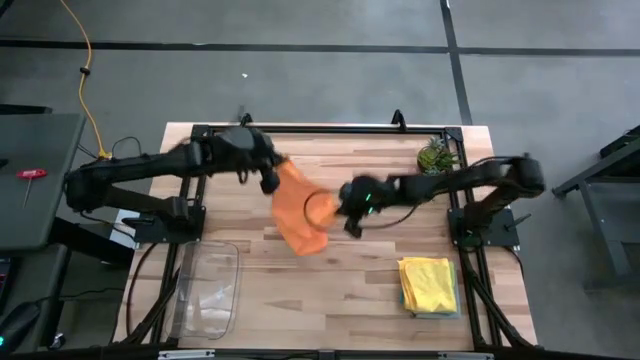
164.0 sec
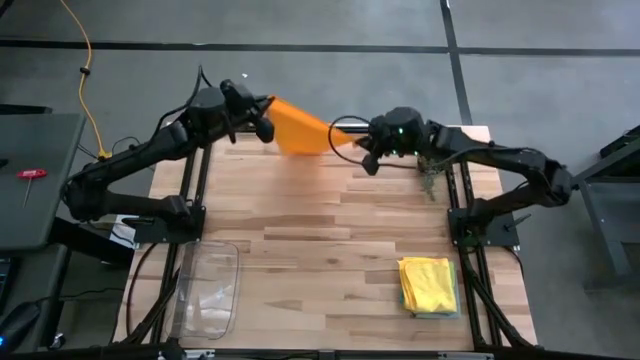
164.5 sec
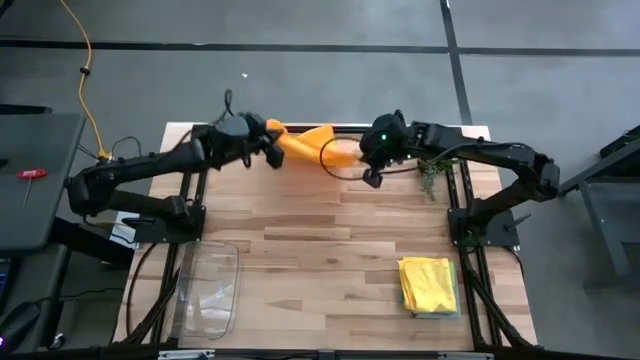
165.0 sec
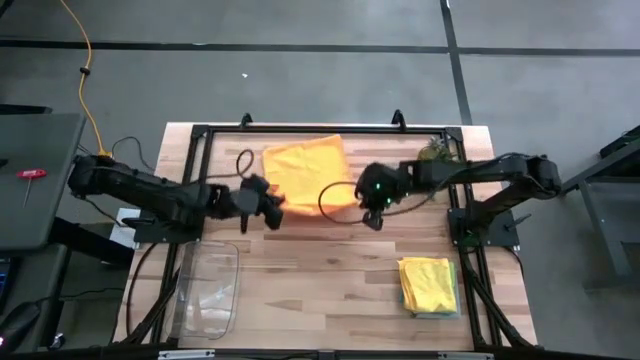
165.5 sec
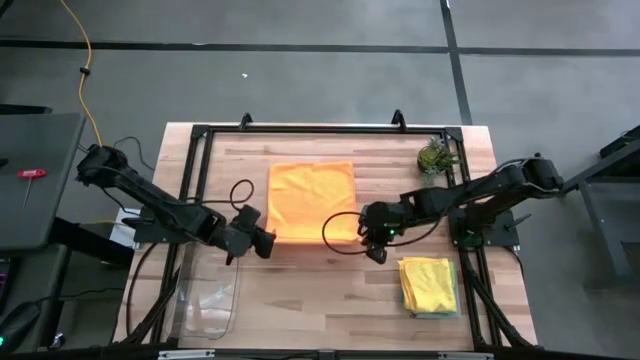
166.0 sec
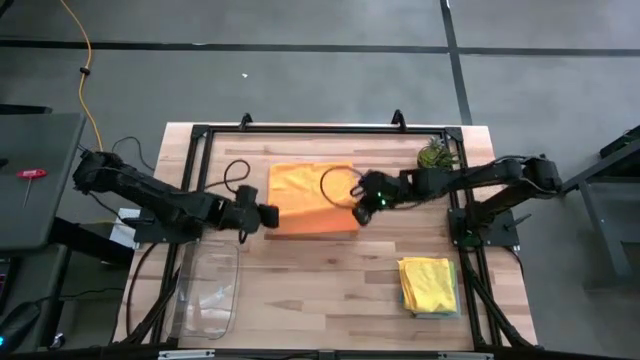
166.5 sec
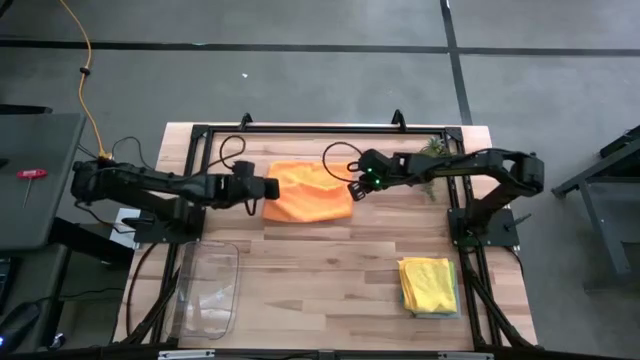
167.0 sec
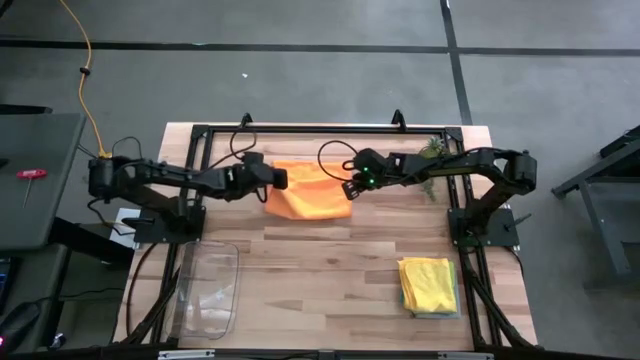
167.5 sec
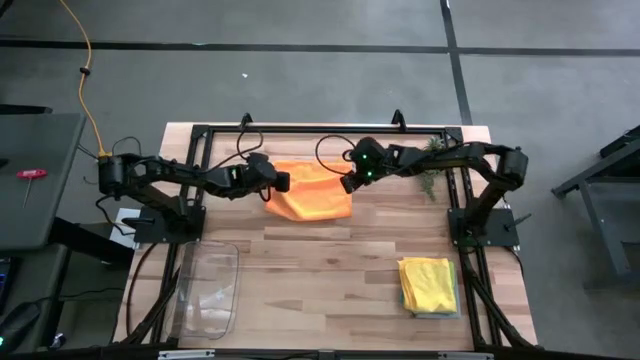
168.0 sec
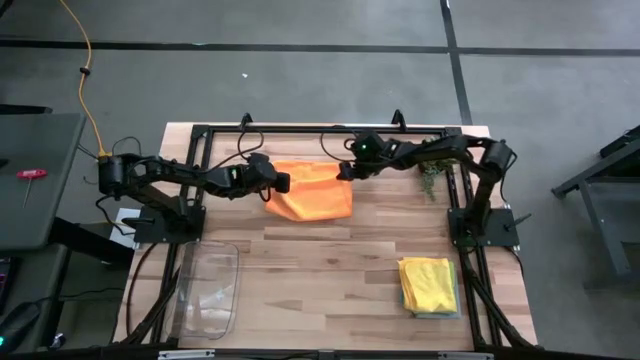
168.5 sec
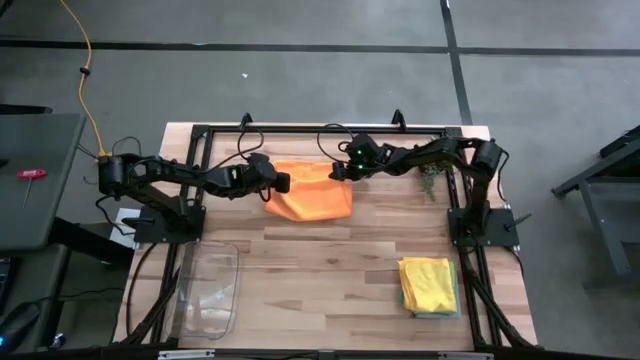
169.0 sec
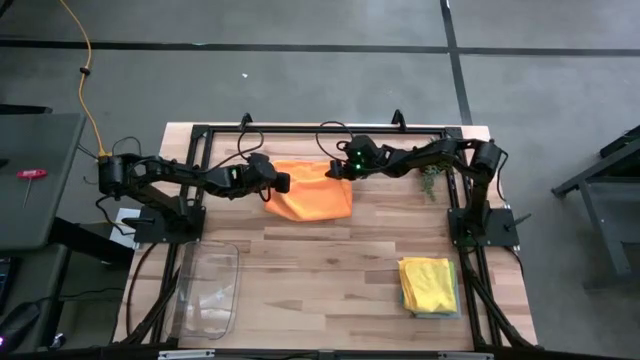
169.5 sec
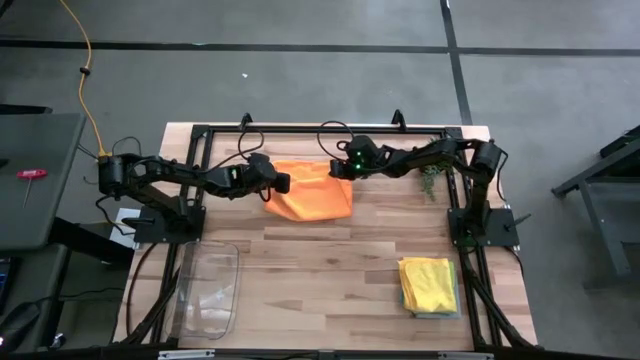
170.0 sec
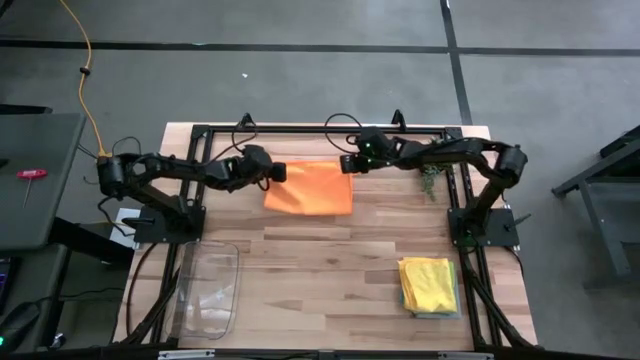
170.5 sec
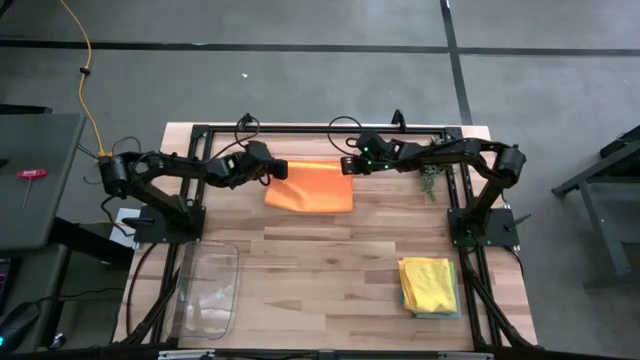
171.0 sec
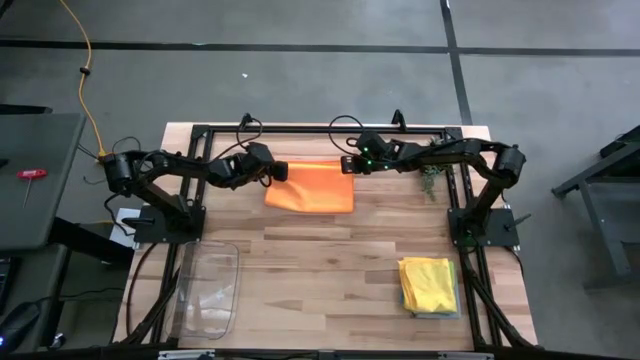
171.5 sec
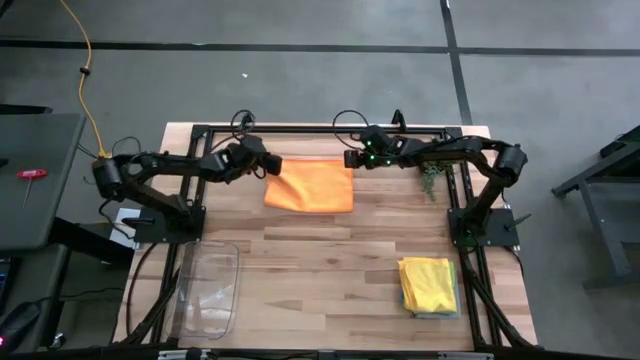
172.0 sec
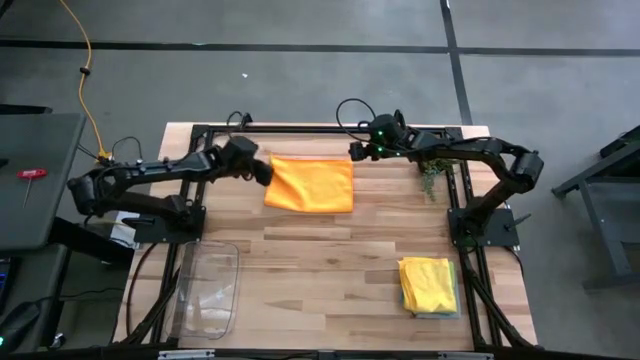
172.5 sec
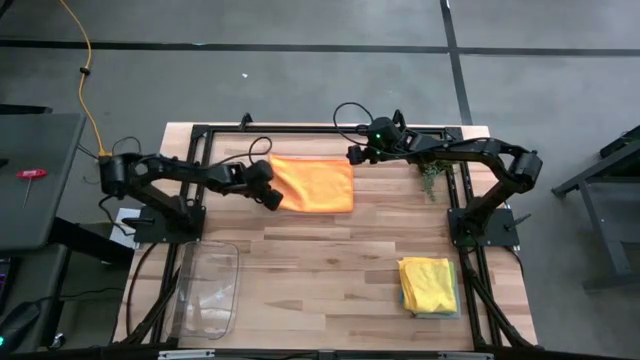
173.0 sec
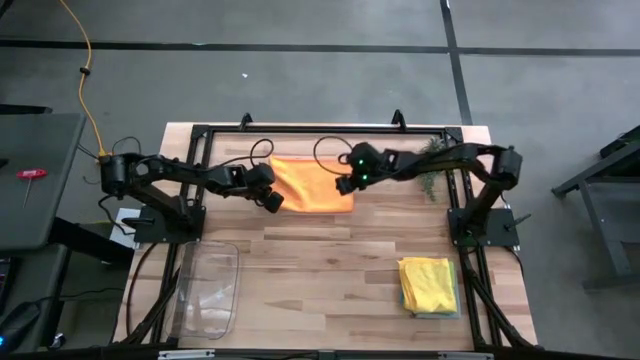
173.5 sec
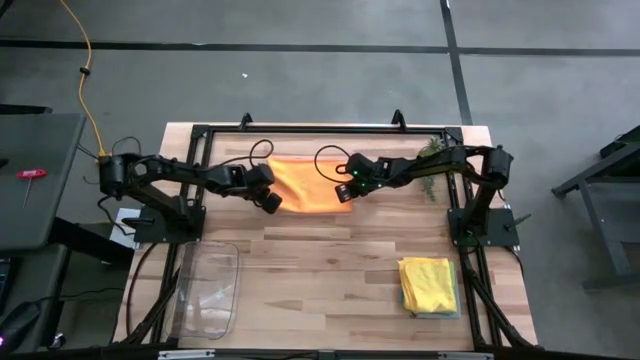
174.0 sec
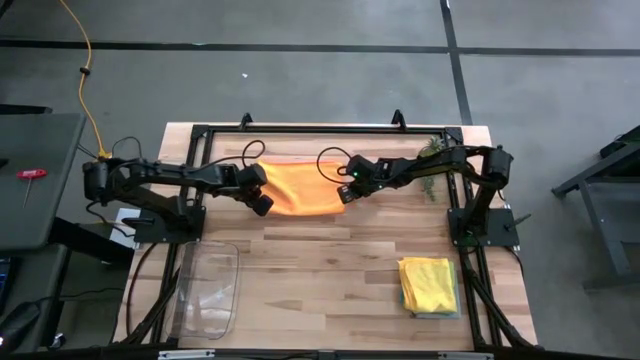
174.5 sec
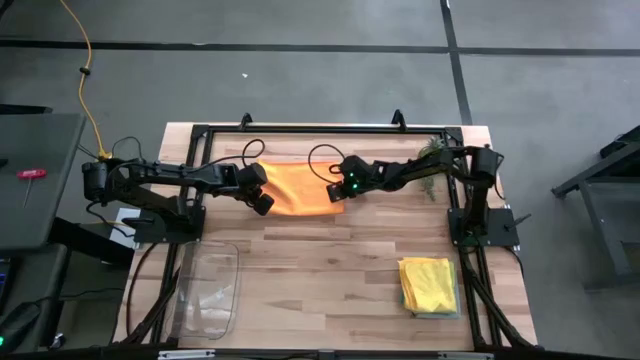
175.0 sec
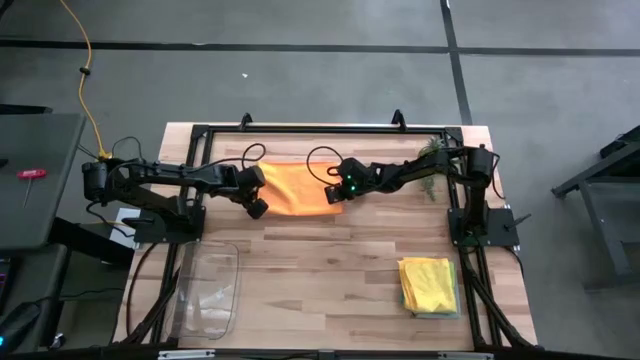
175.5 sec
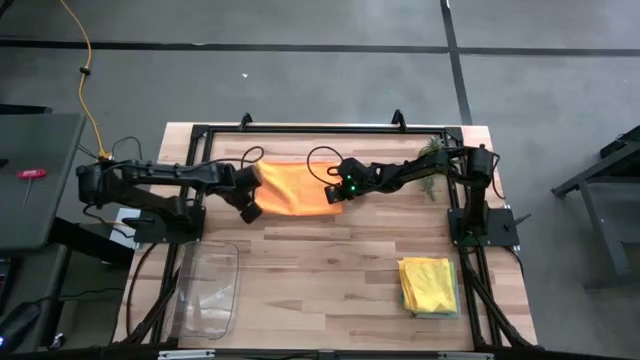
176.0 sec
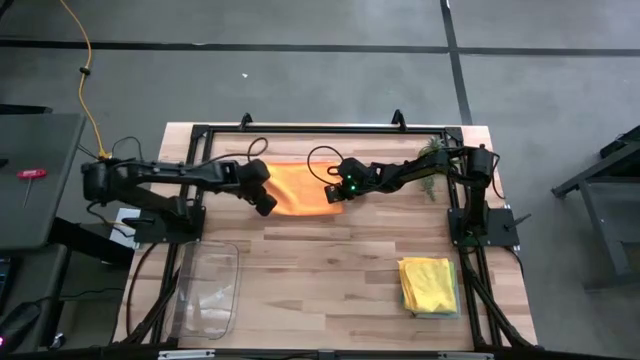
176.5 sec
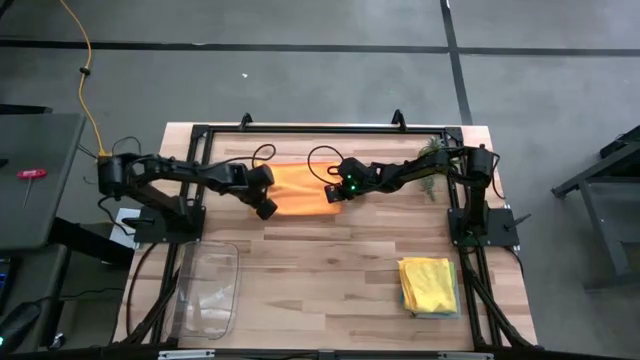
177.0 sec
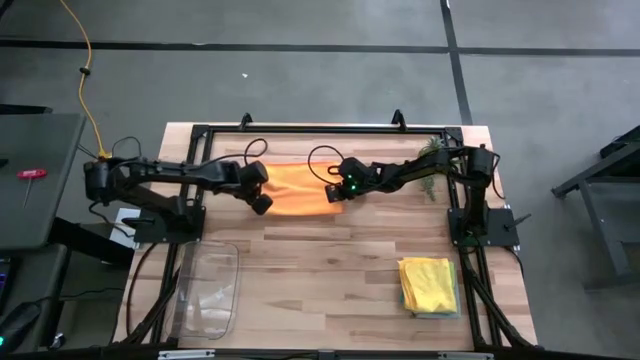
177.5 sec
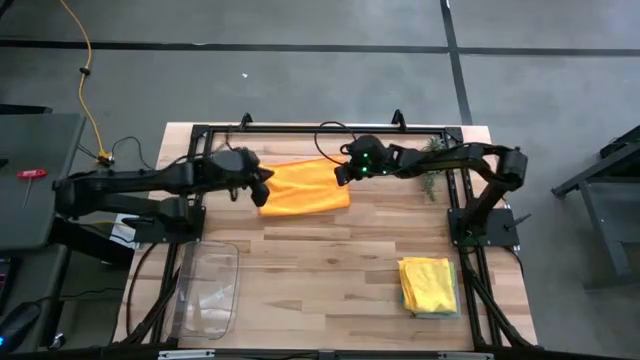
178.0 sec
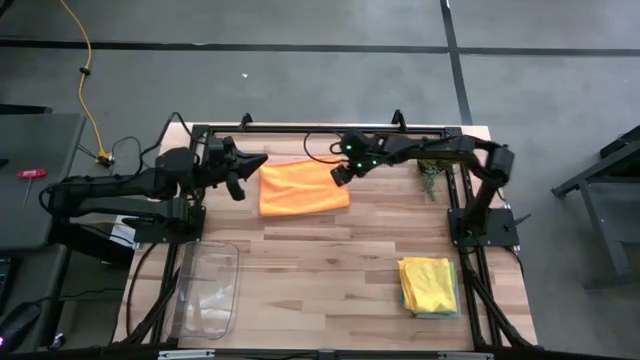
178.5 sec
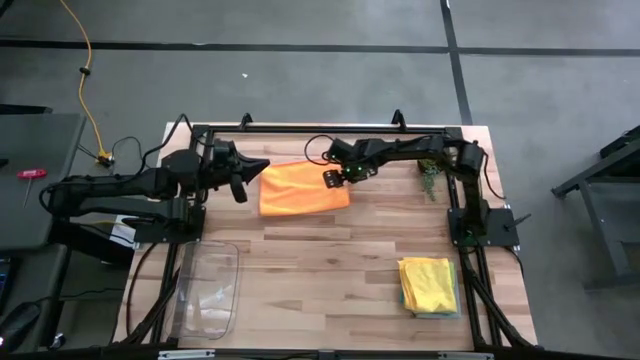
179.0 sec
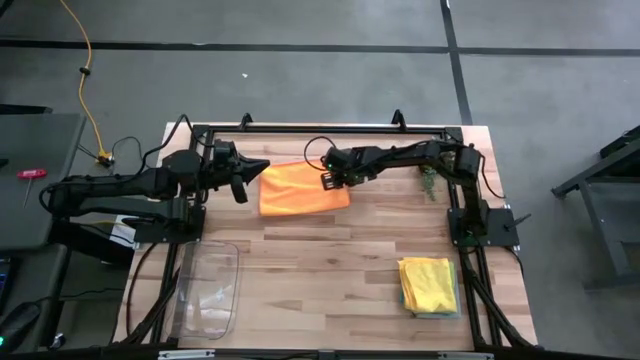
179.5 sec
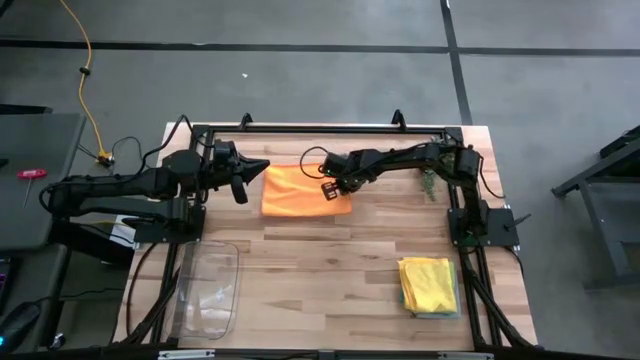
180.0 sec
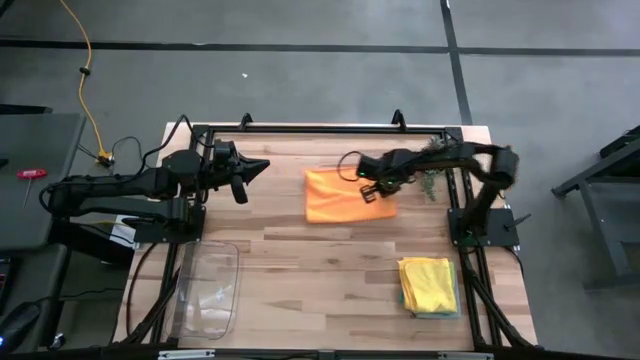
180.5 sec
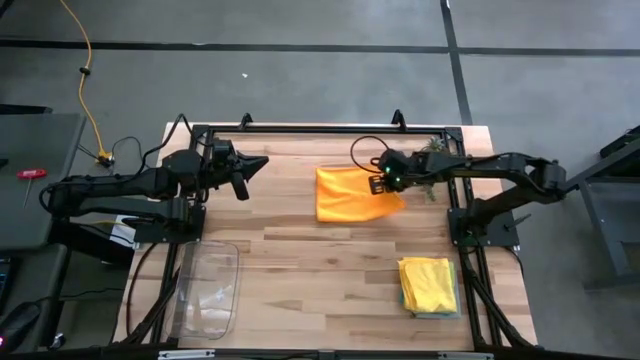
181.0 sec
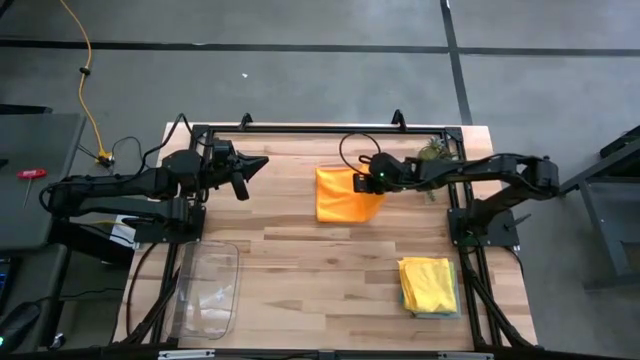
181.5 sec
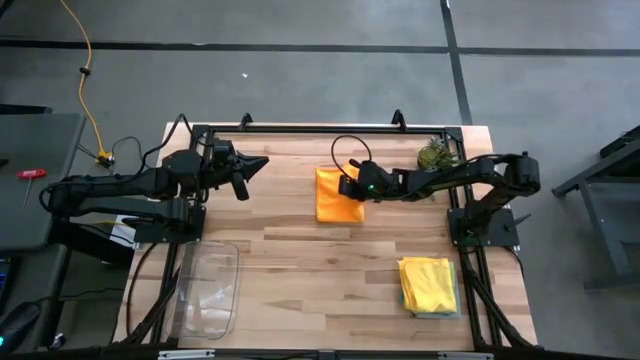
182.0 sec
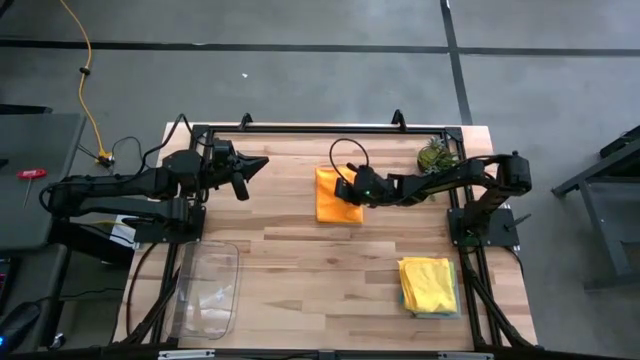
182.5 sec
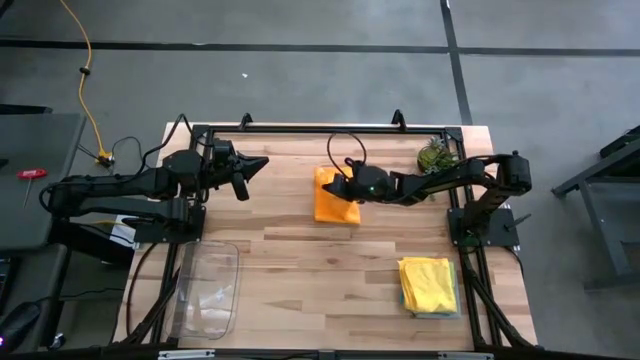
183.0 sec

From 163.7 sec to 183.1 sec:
Task: Fold microfiber towels
Fold the orange microfiber cloth

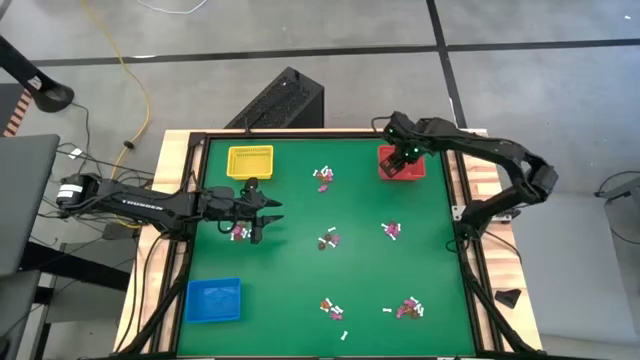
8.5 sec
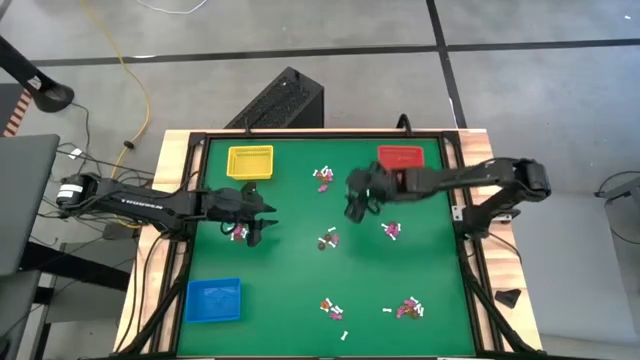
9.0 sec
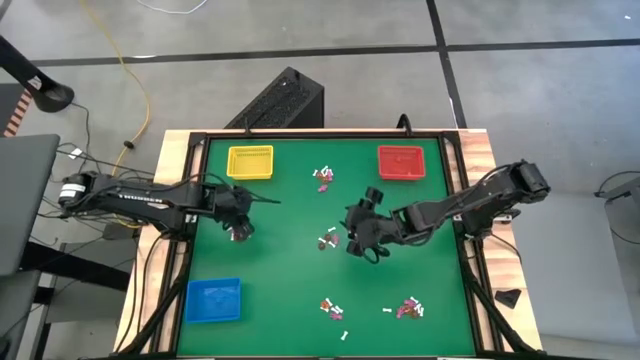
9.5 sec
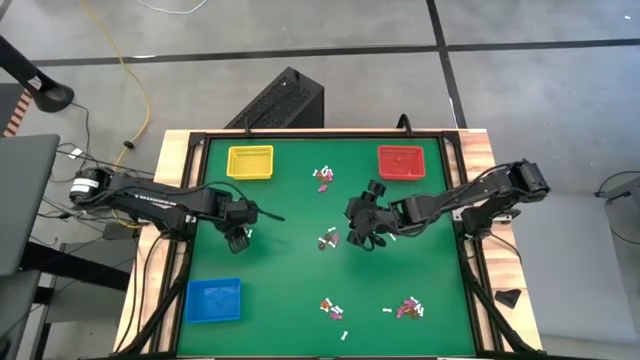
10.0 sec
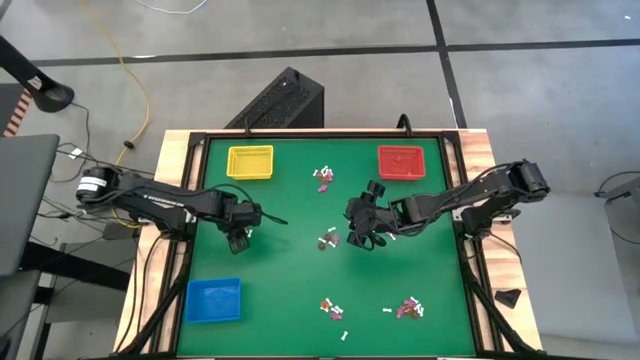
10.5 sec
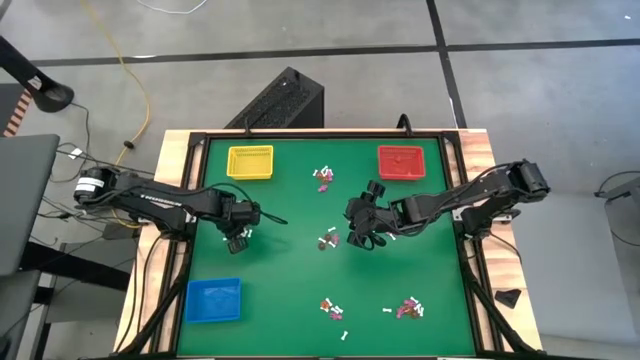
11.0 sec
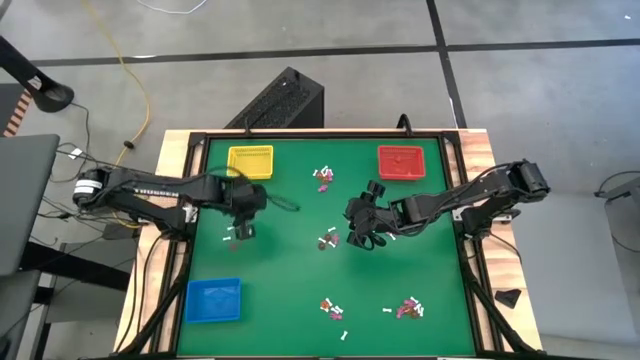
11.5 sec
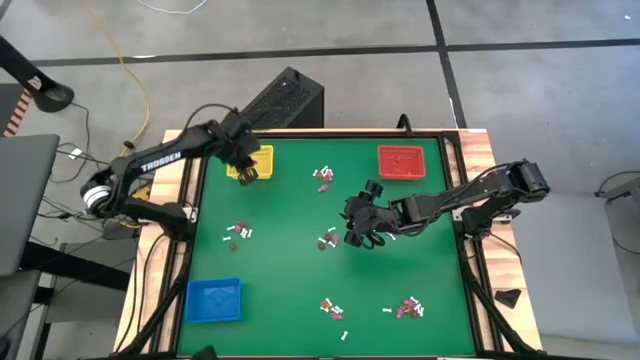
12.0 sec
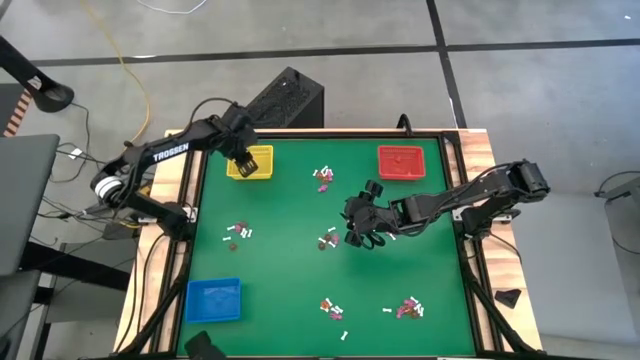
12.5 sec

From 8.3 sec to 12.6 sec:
Task: Sort Halloween decoration
Put the pink skeleton toy into the yellow bin
